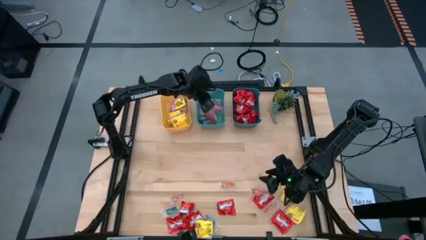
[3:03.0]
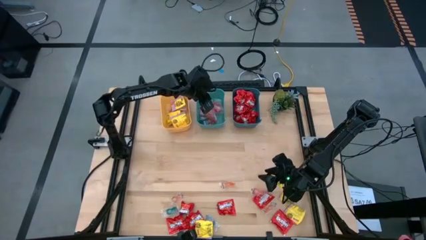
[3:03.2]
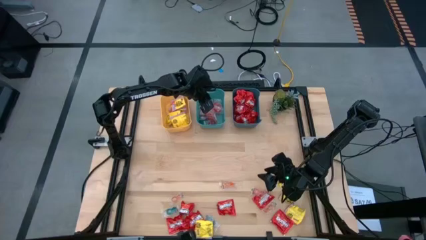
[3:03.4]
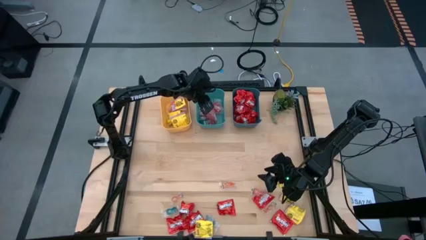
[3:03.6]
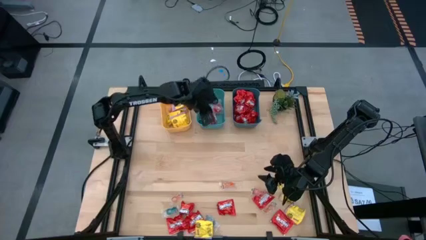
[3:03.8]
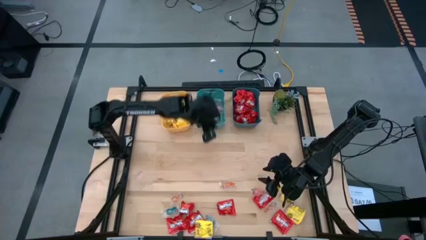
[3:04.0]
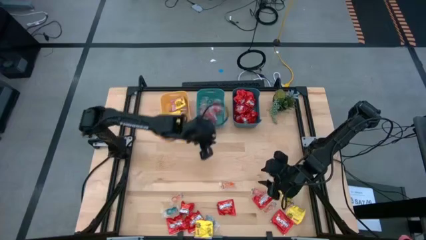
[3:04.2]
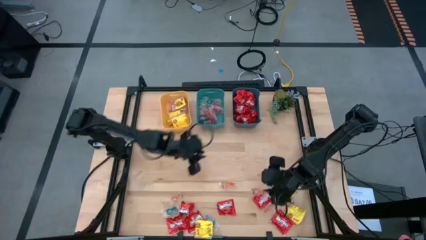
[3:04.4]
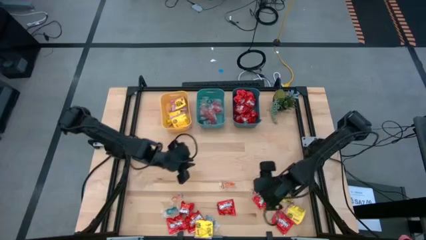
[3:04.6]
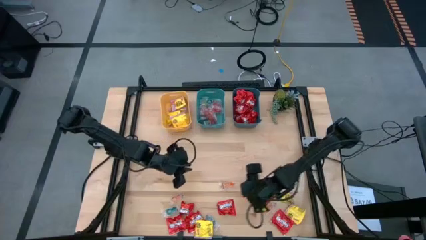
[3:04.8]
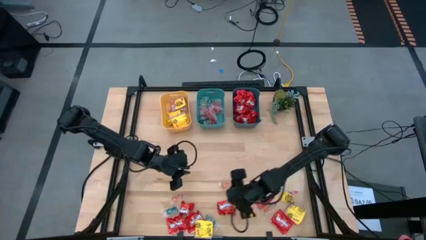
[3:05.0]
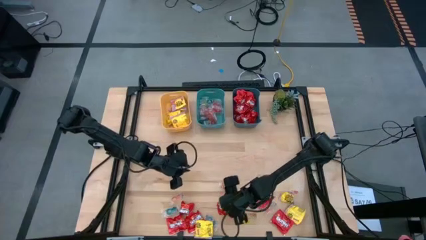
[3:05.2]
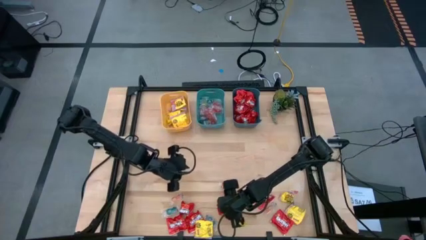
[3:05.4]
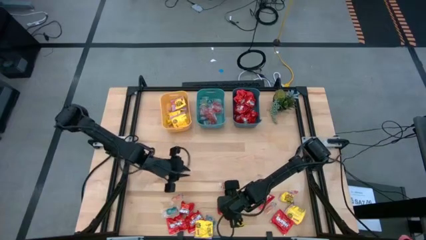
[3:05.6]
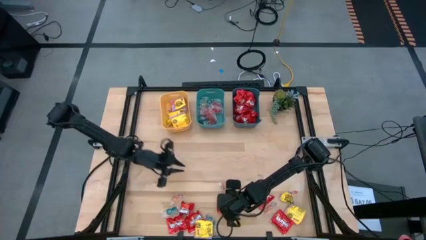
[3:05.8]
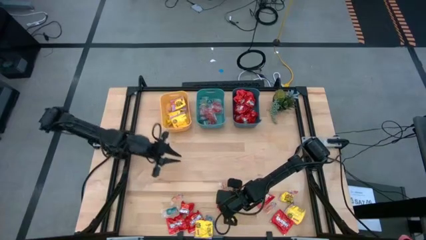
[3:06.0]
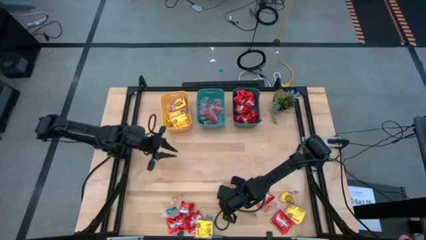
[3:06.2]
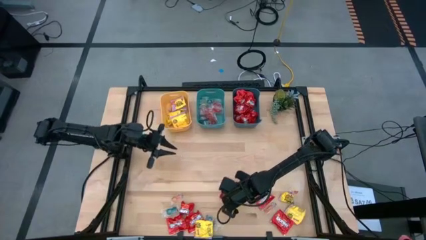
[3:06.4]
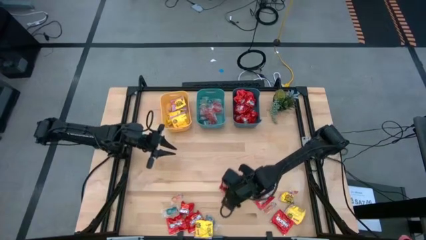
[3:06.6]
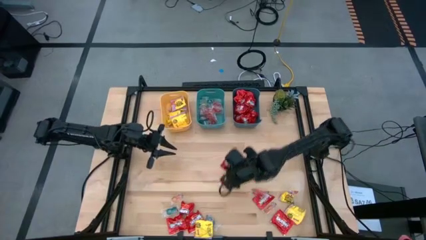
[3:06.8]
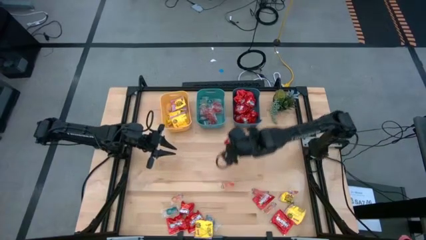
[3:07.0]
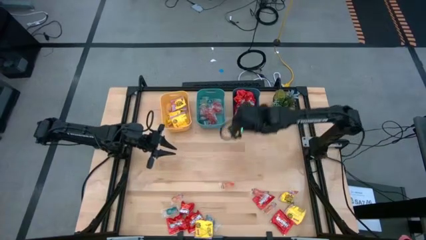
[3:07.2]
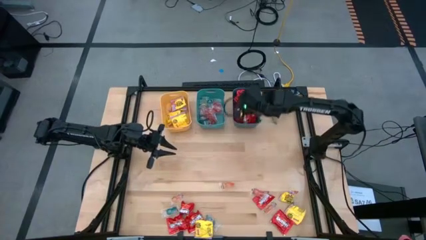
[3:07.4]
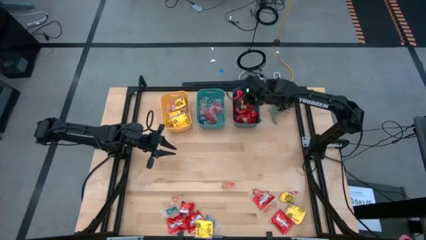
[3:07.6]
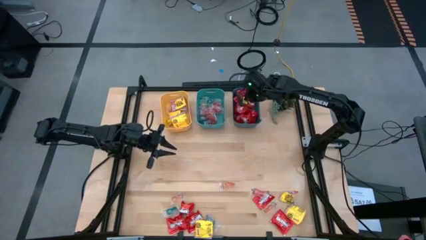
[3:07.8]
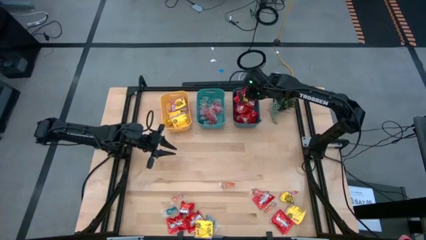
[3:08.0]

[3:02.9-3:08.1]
Task: Sort candy
Put the red candy into the blue bin

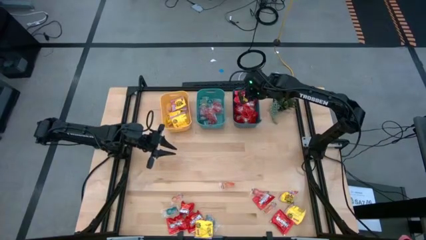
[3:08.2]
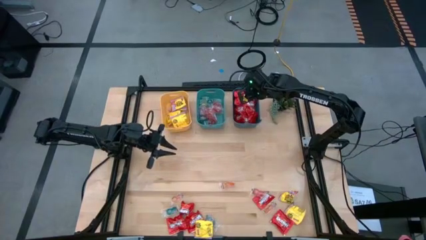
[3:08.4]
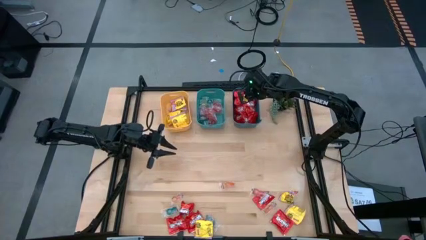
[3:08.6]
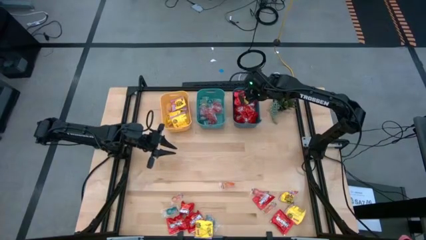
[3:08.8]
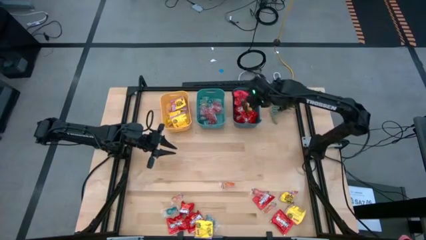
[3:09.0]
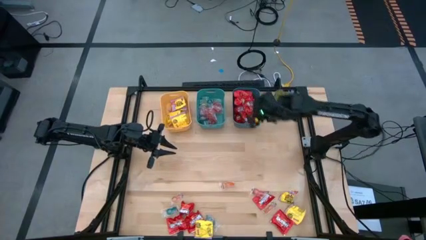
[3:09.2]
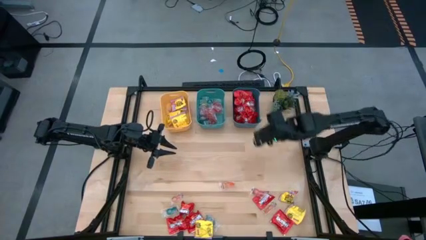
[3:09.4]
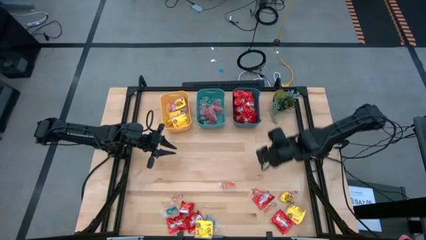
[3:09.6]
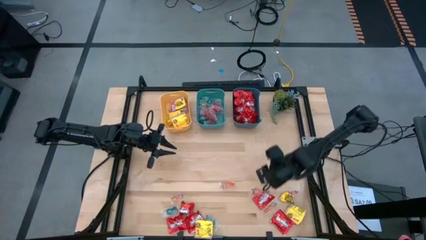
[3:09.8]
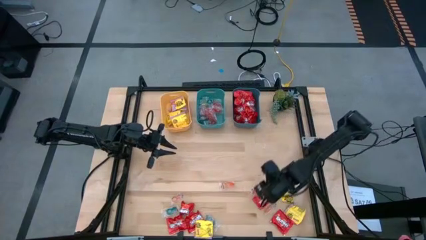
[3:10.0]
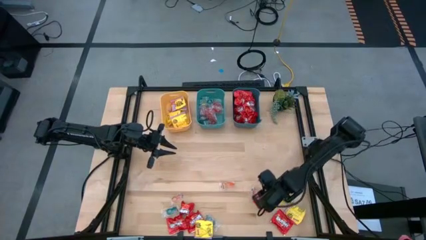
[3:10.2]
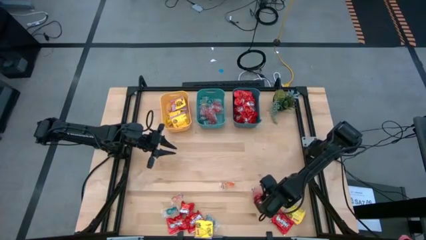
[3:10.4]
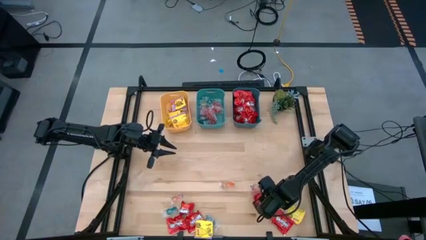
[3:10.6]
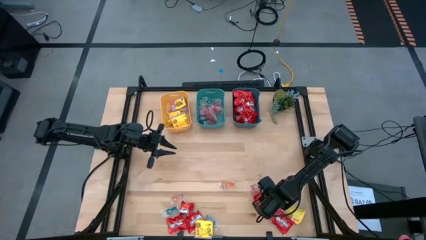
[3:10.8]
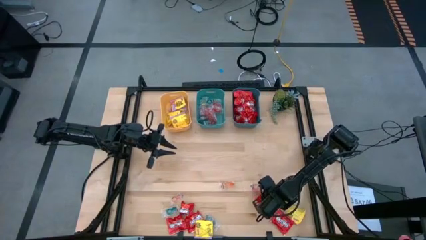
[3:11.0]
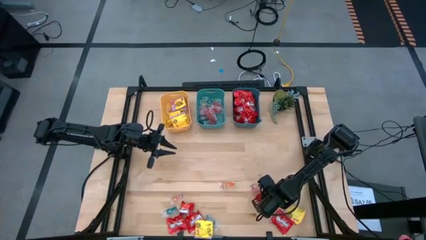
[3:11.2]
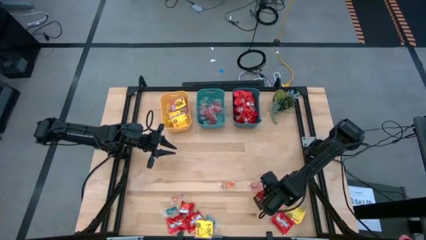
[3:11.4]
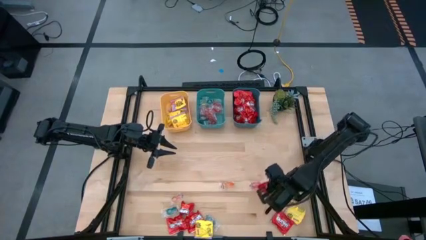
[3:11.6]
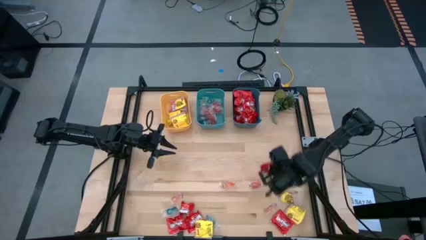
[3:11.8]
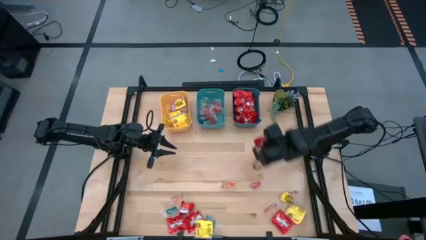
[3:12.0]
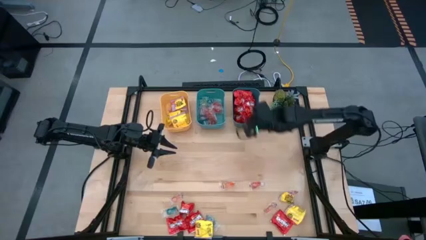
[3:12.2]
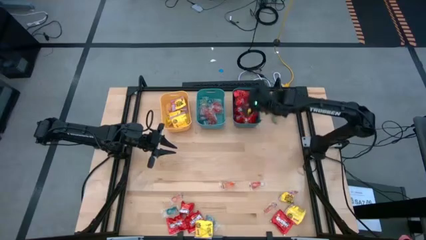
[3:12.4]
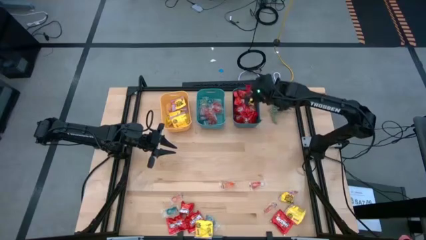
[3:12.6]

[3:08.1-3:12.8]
Put the red candy into the blue bin

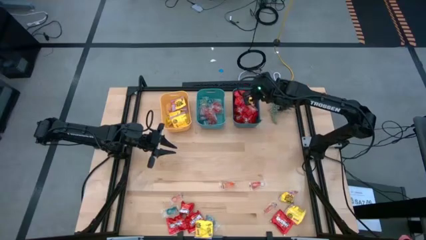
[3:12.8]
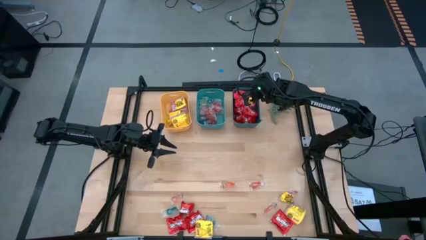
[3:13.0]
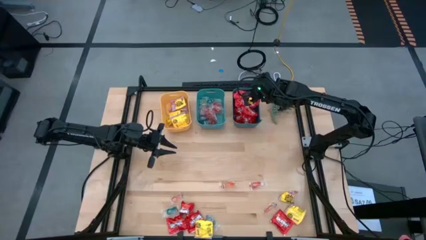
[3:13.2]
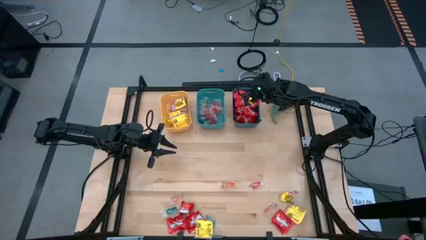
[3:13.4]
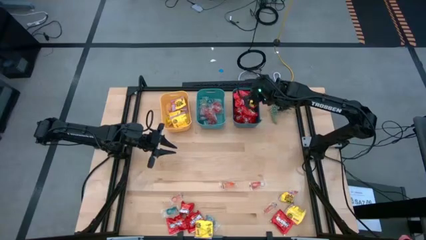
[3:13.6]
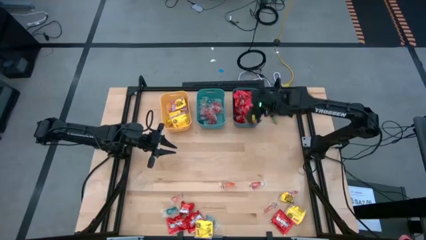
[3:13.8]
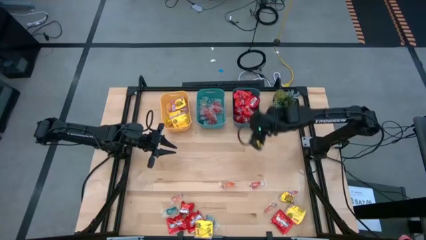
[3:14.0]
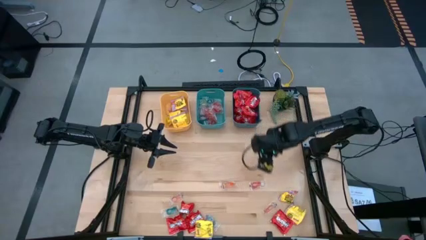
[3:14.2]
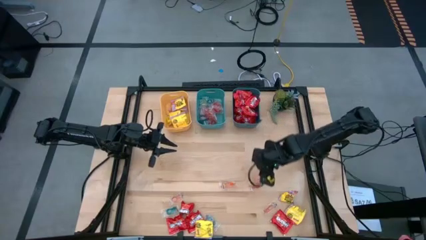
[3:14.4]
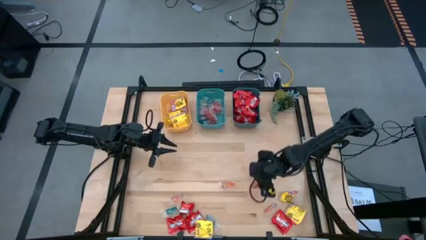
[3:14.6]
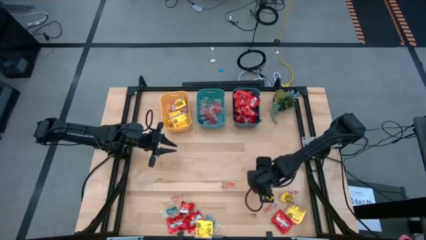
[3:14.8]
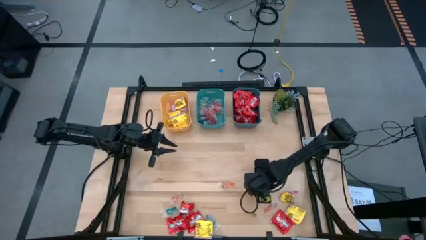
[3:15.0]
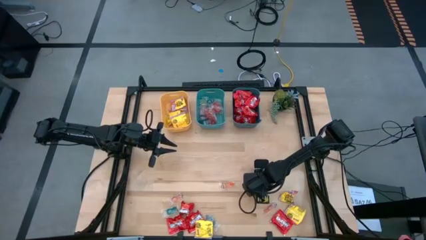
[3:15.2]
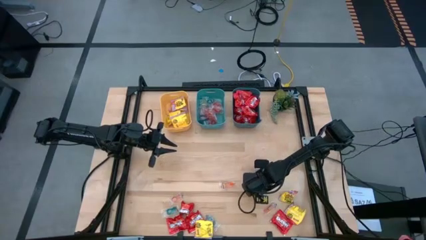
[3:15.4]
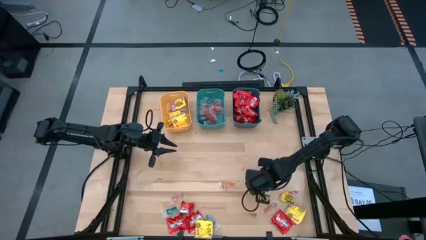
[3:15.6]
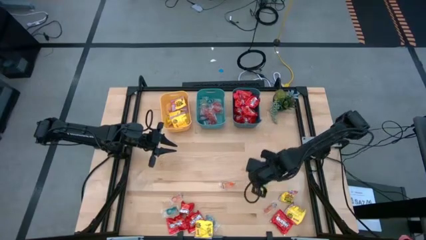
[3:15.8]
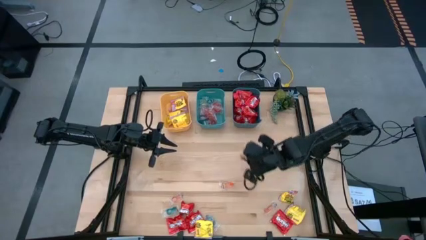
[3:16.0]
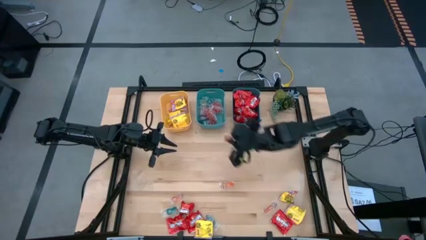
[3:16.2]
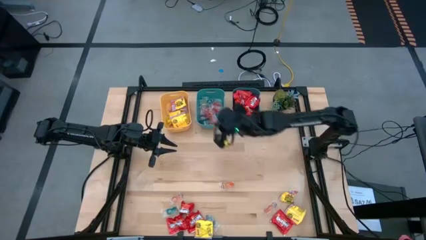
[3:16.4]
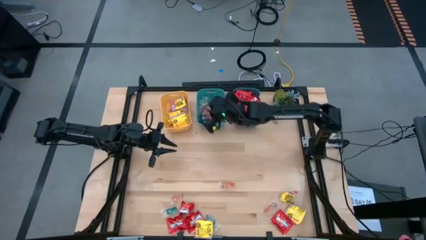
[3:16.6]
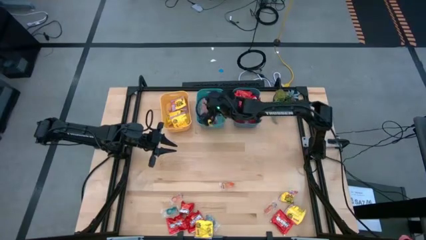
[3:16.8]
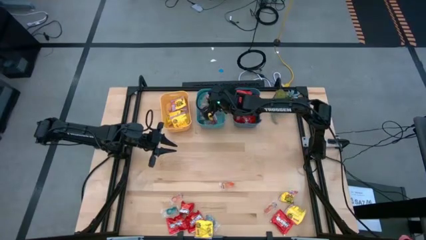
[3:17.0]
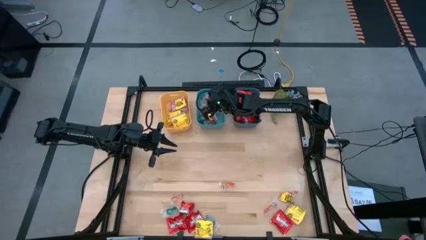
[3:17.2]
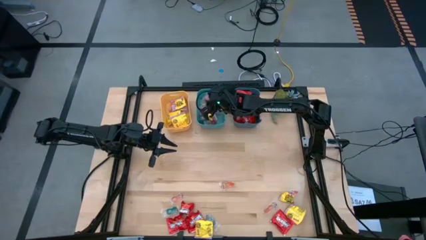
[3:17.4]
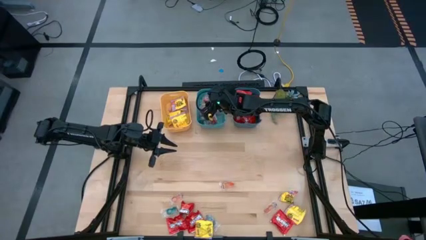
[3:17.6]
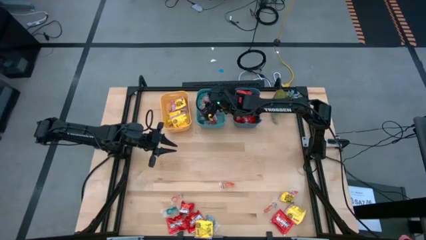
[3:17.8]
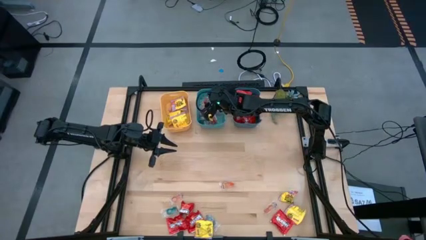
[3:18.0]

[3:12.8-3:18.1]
Put the orange gummy candy into the green bin

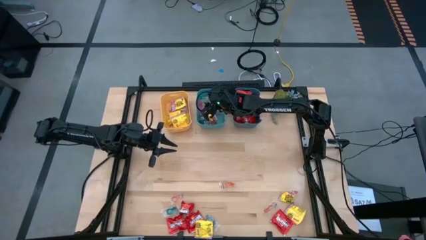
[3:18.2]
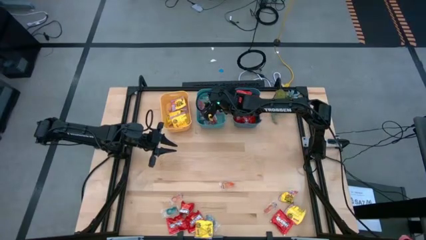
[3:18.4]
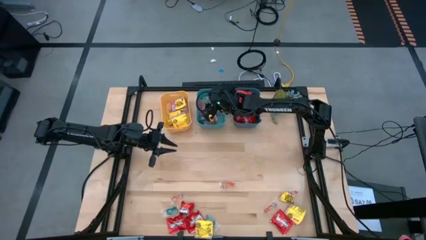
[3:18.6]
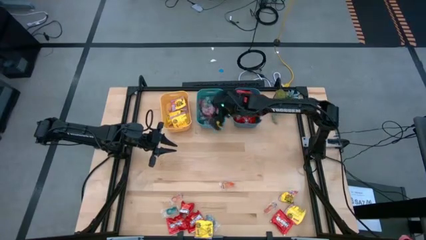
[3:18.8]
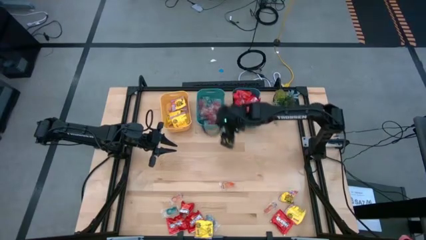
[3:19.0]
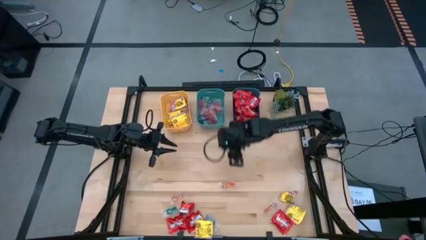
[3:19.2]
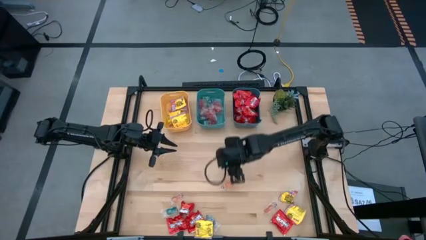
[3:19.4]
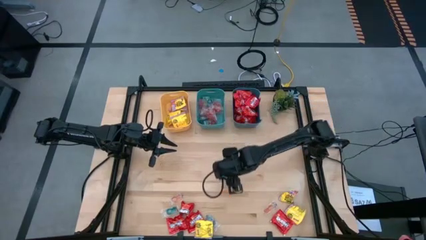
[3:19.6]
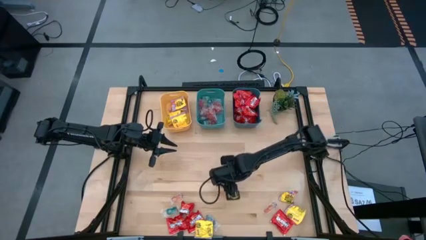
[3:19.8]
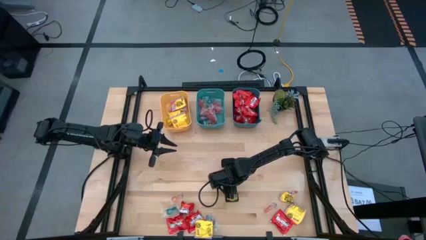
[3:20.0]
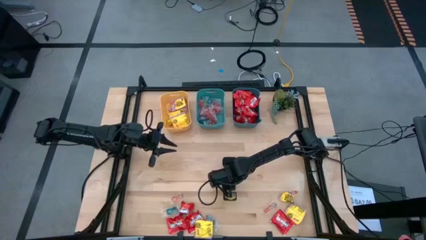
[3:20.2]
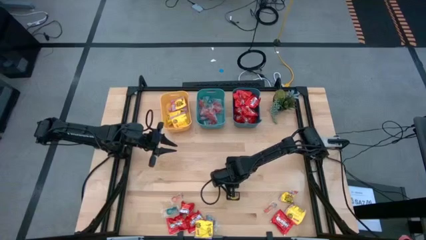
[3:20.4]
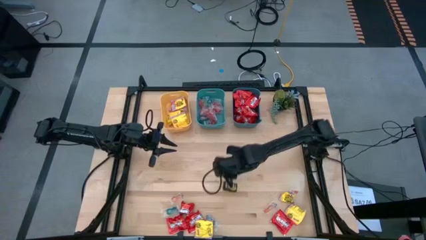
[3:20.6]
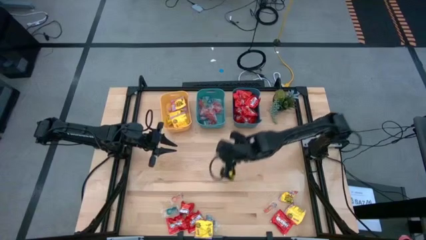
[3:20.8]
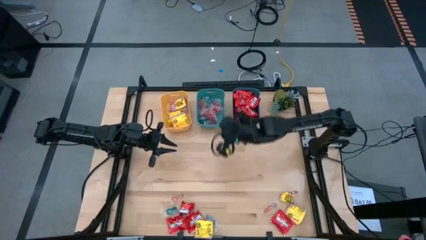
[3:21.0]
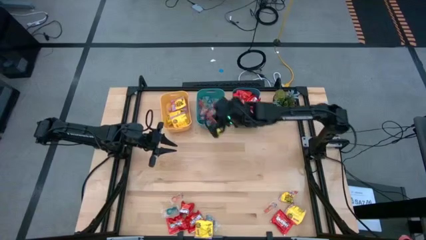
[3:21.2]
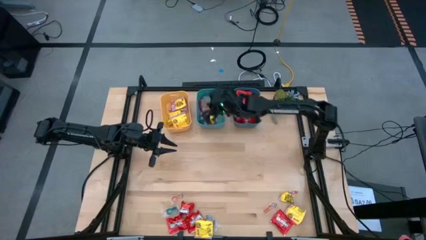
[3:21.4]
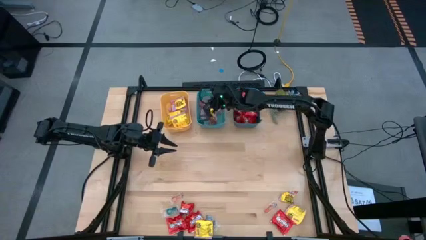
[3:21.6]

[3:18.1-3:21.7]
Put the light orange gummy candy into the green bin
